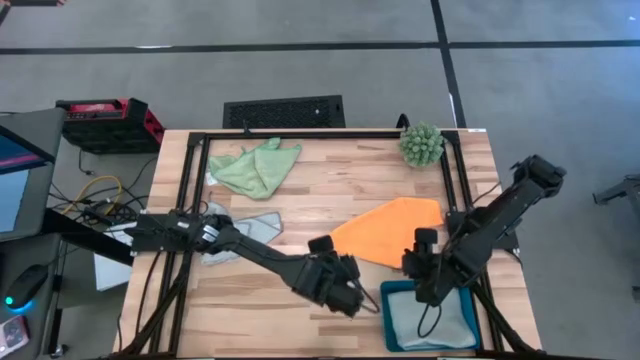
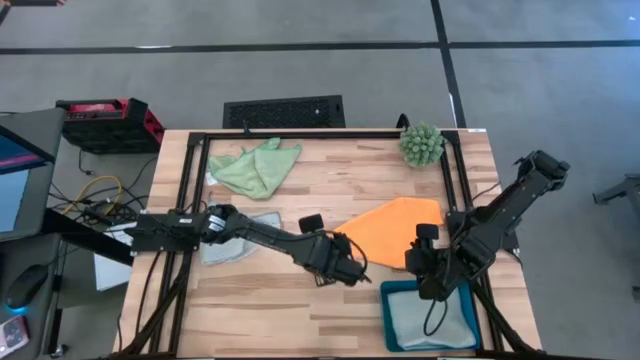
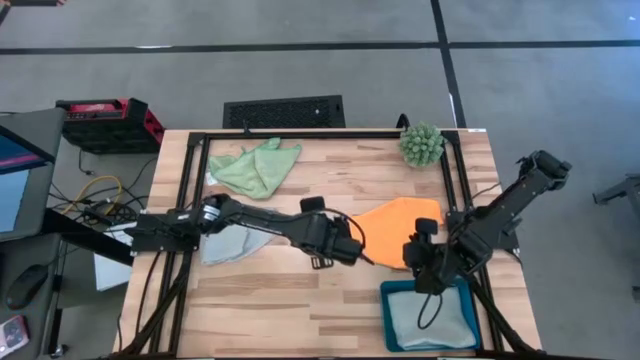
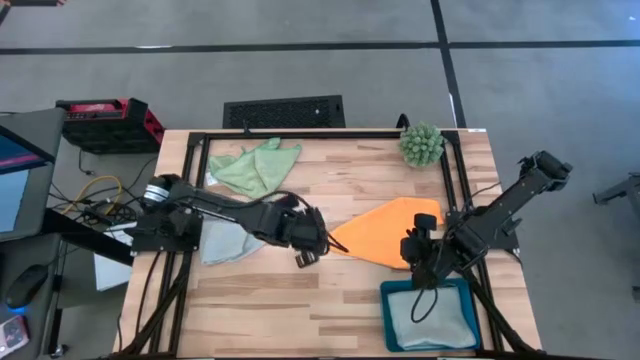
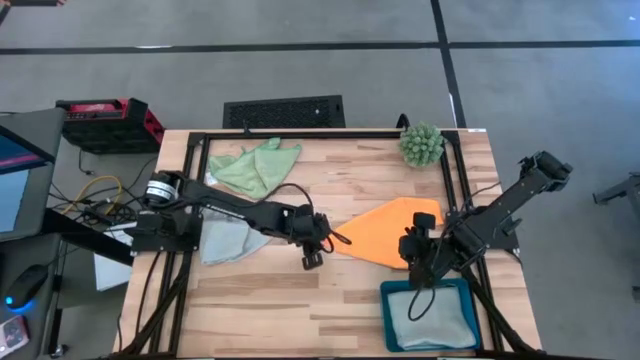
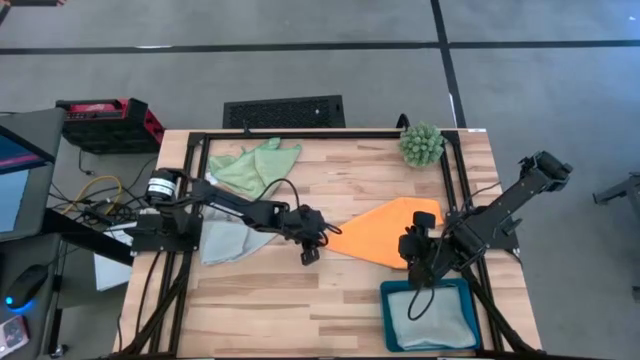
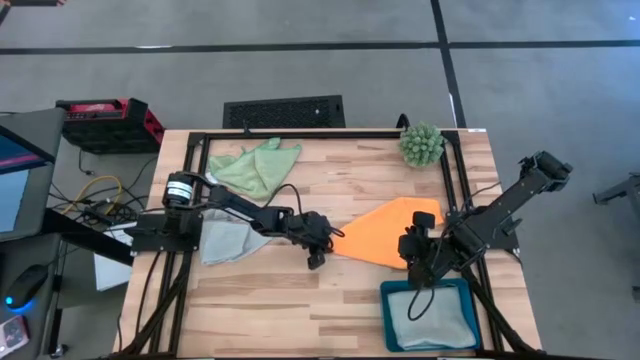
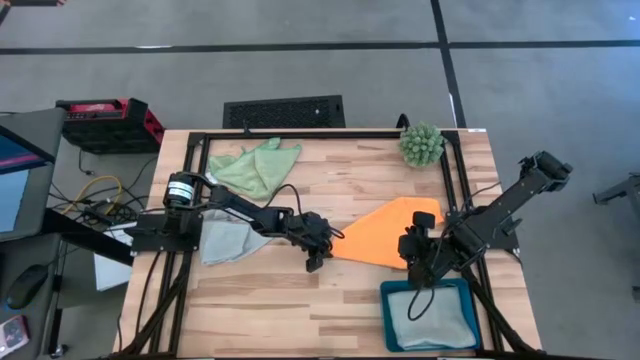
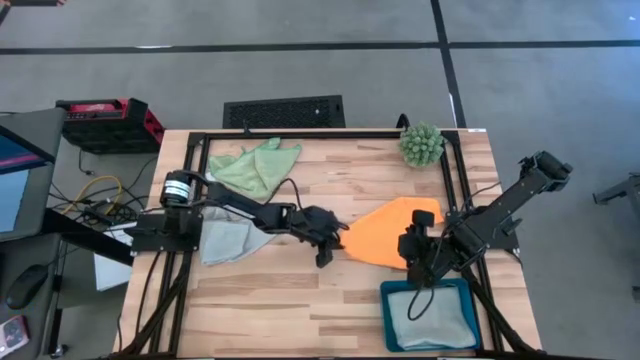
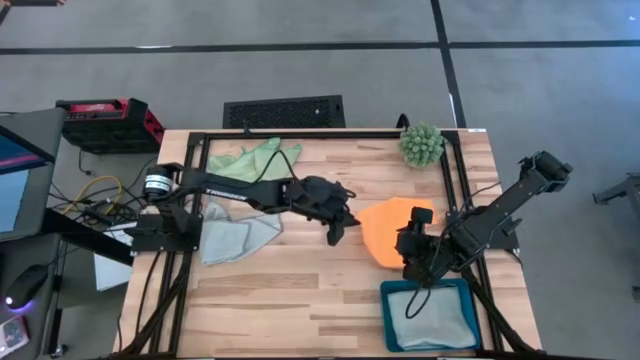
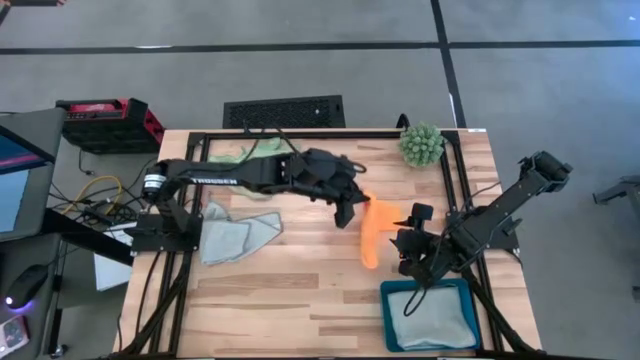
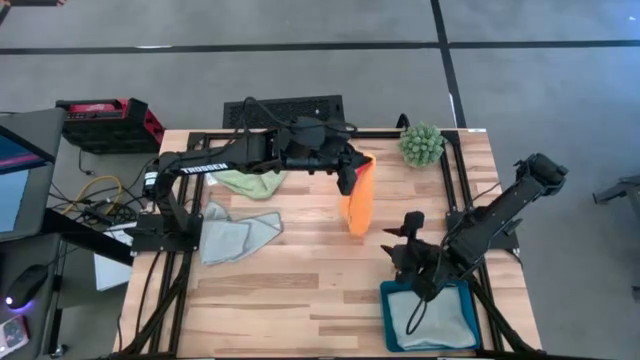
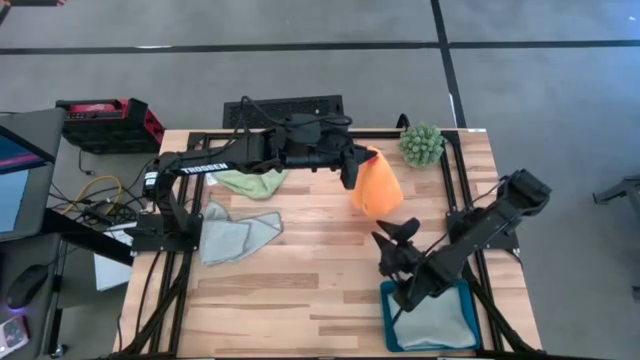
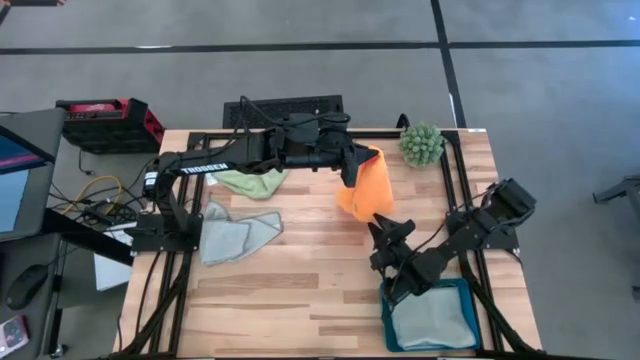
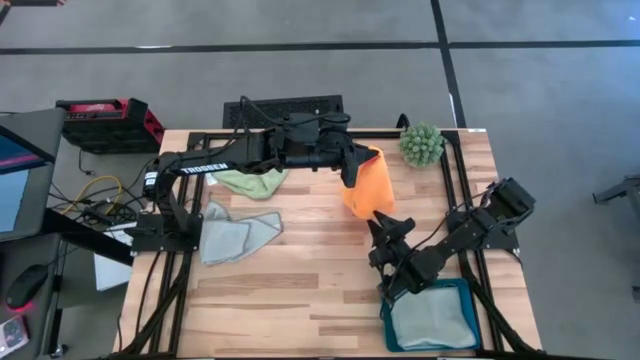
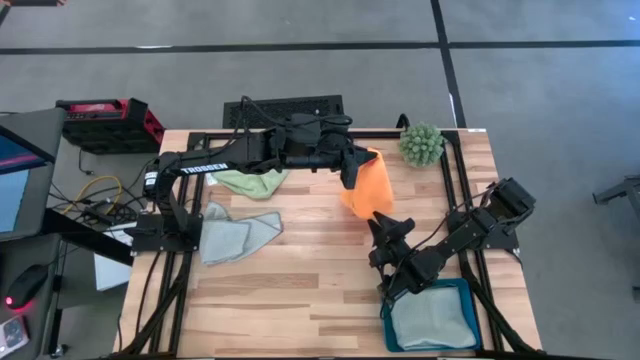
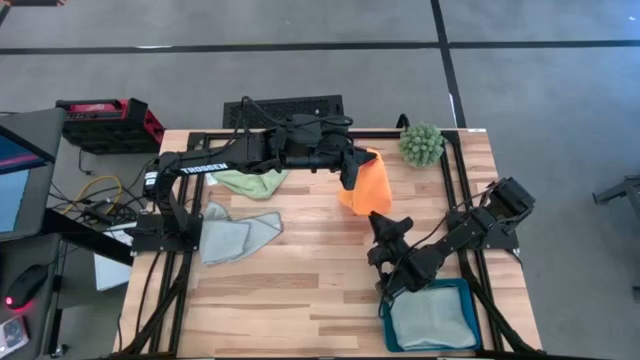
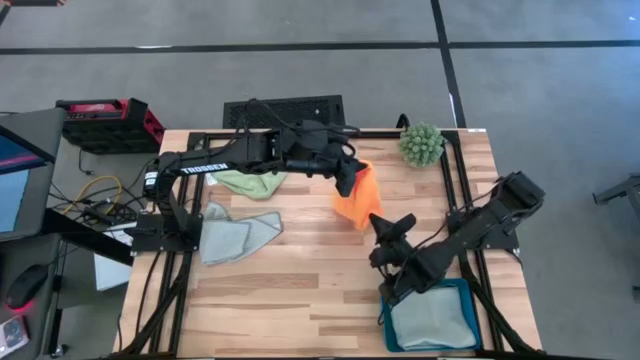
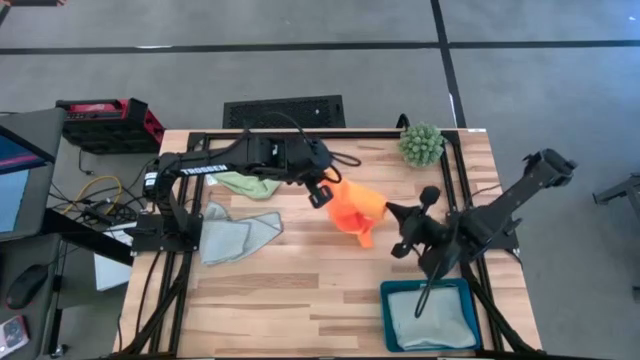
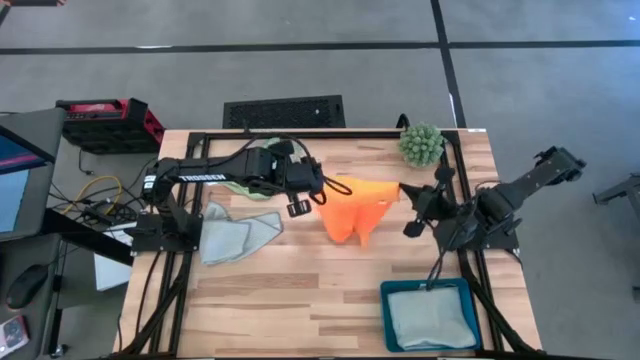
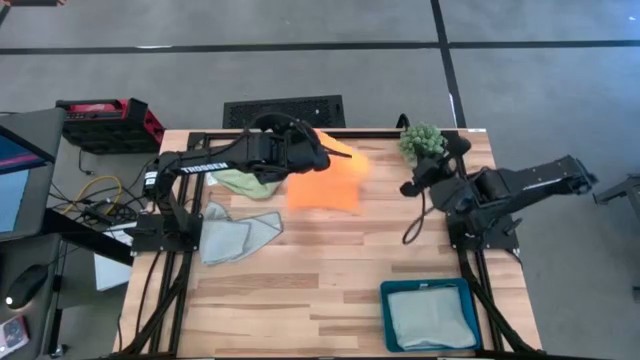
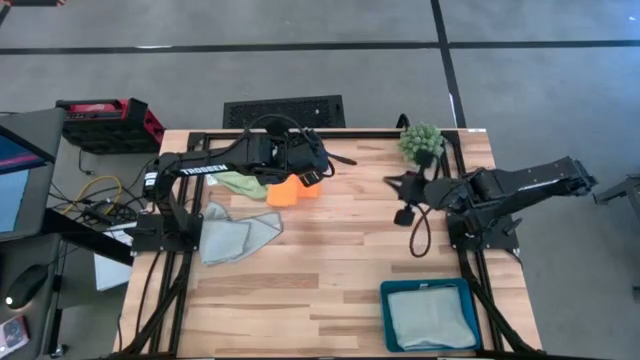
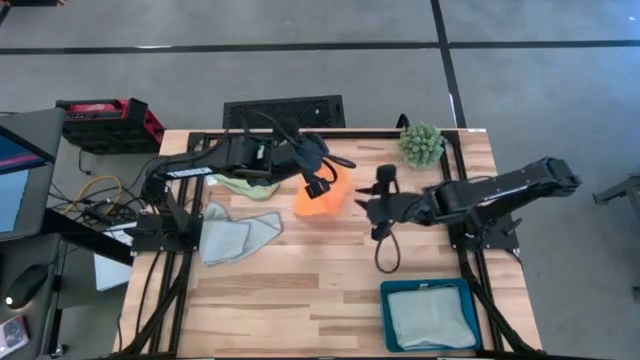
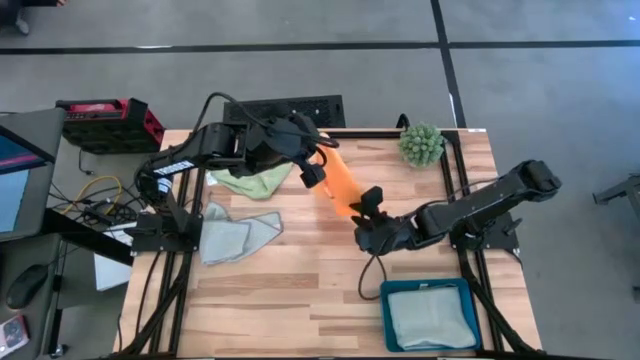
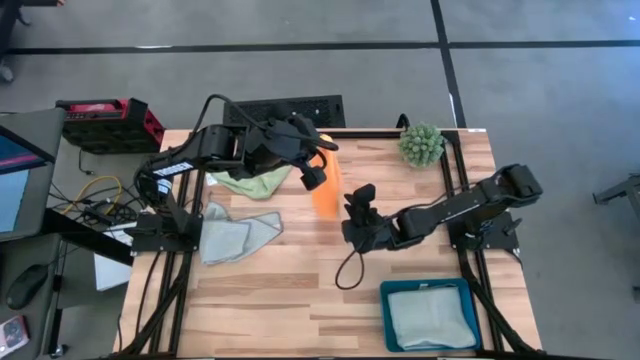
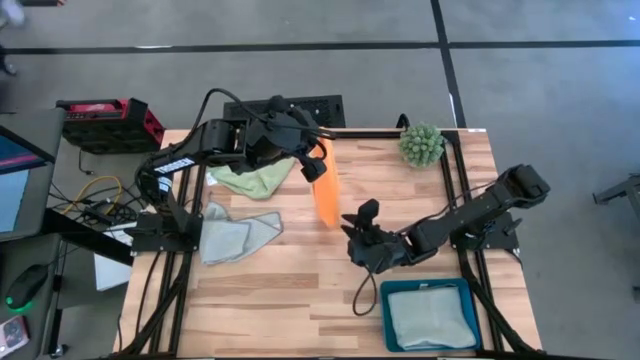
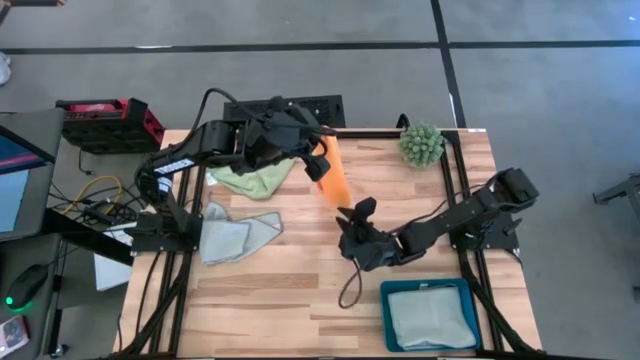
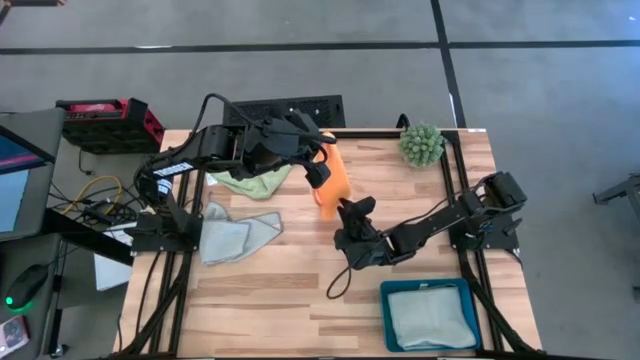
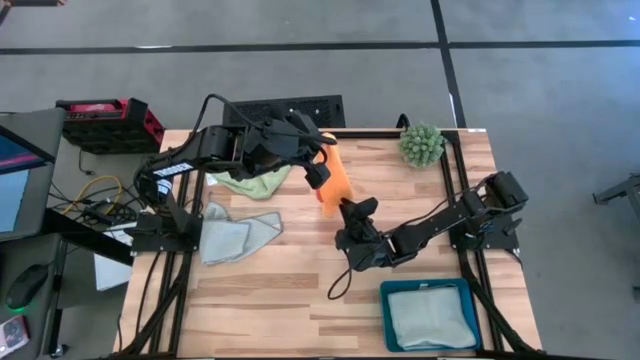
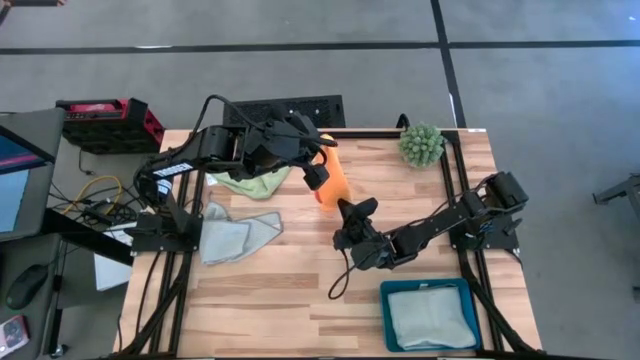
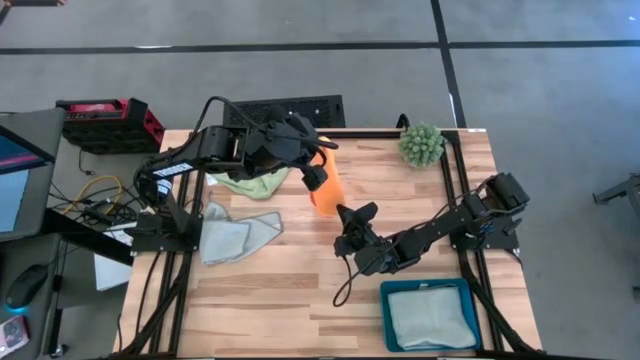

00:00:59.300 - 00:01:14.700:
Task: Fold microfiber towels
Fold the orange towel

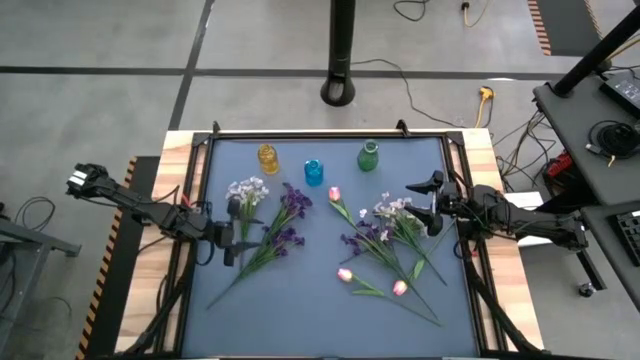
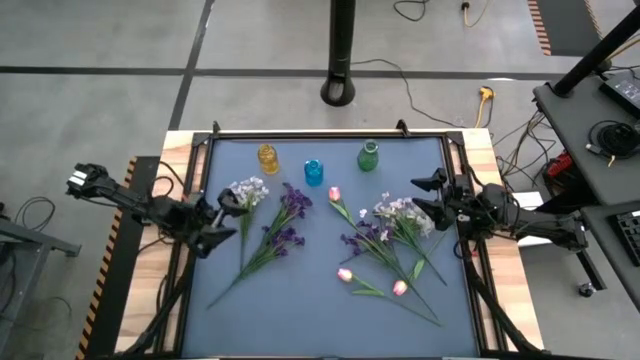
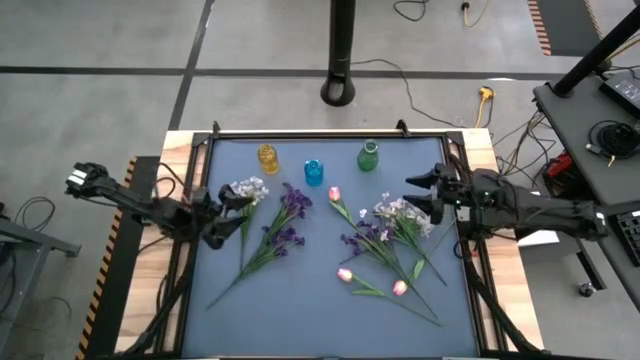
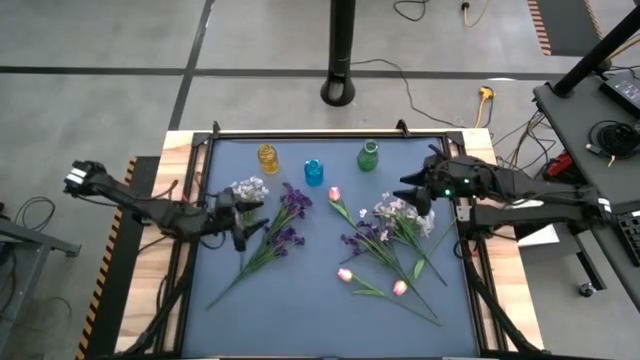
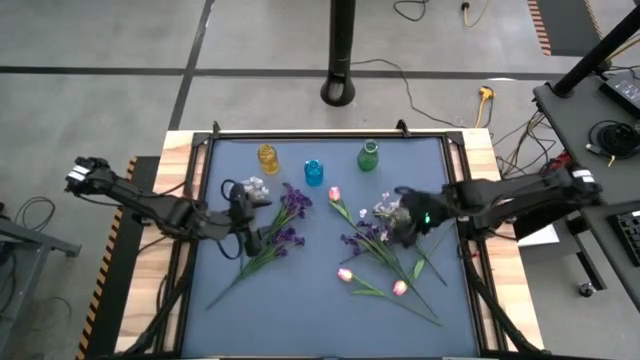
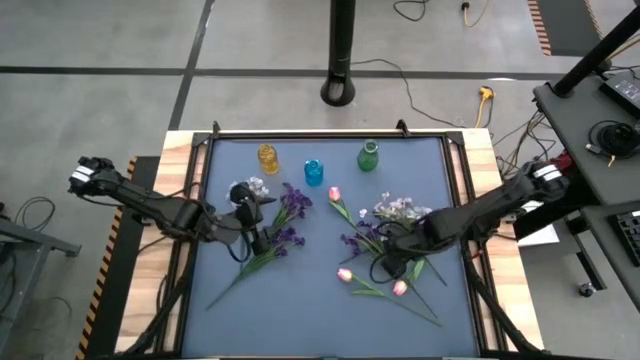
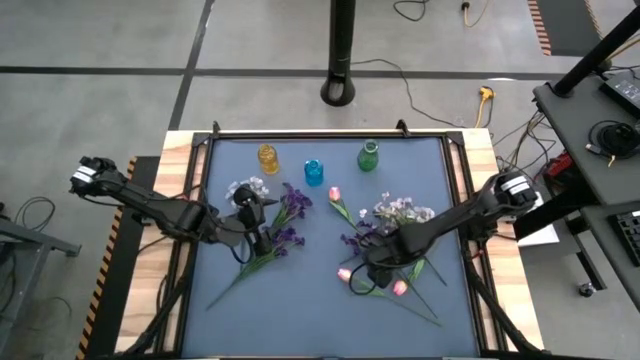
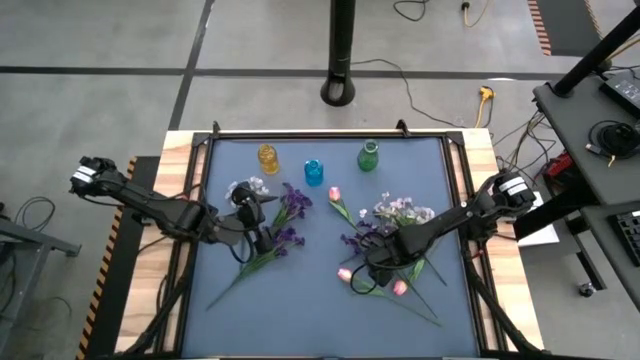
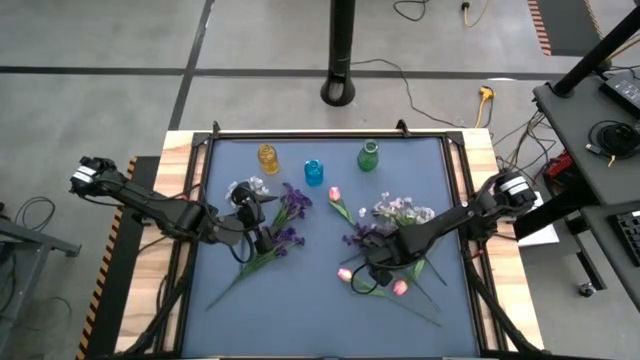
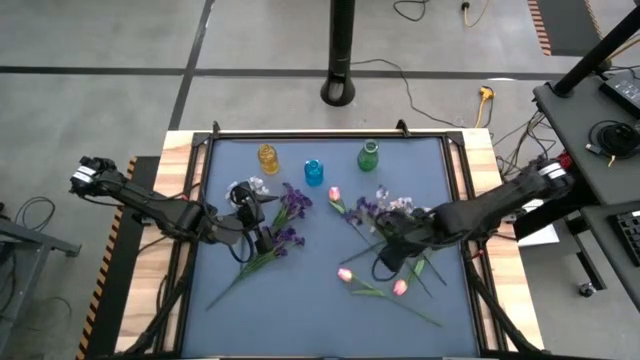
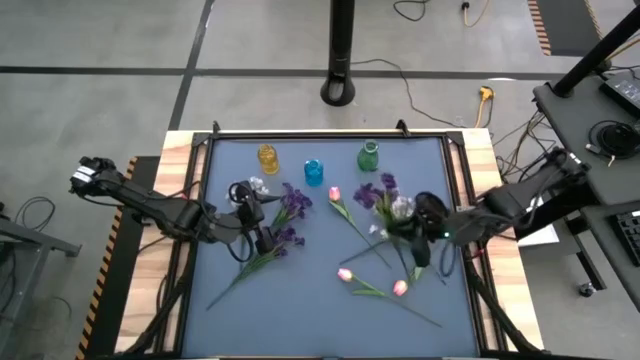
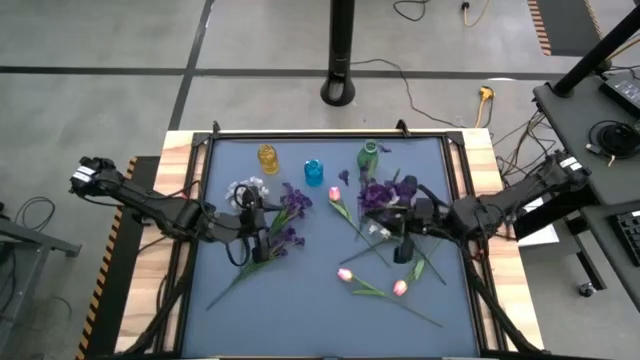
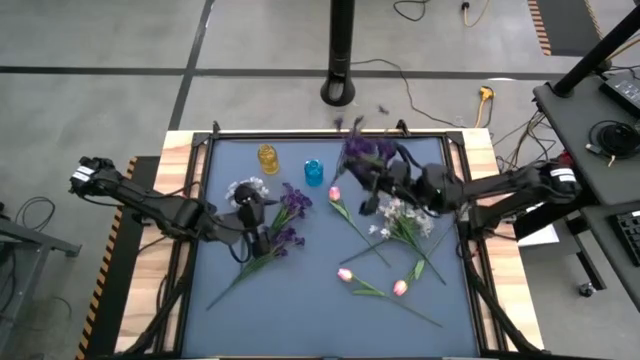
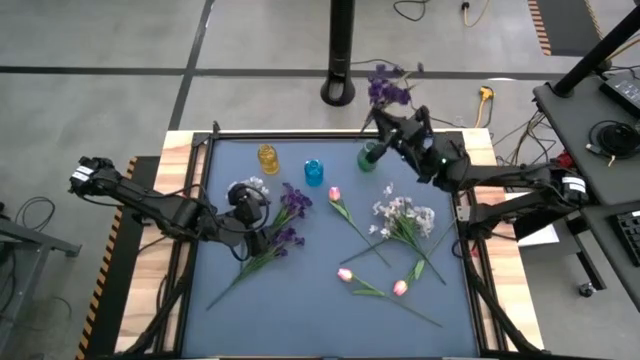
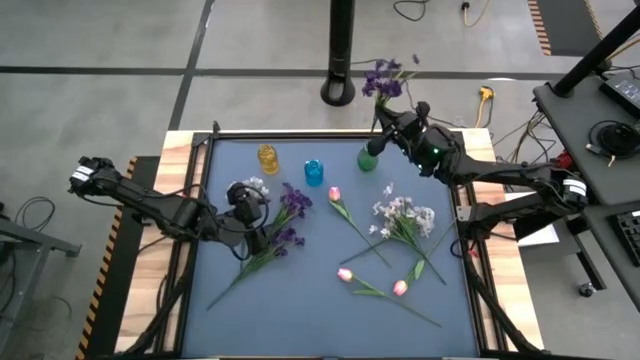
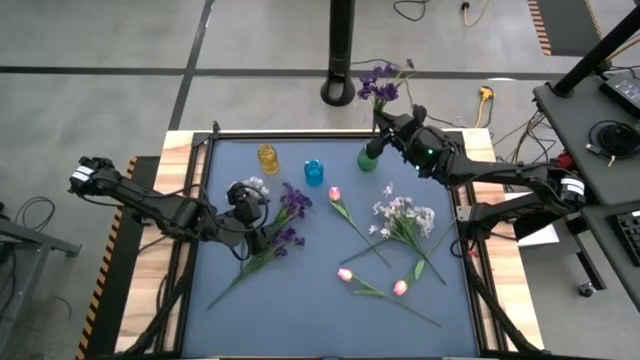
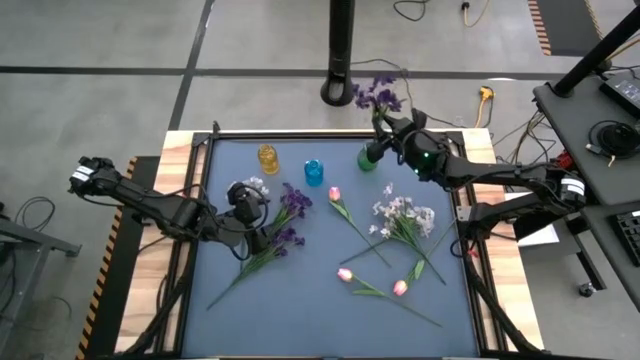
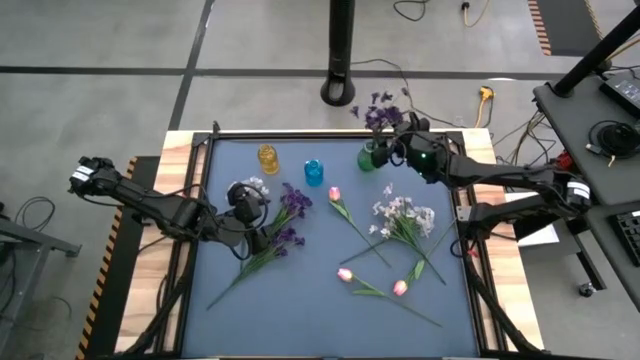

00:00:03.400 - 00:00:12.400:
Task: Sort flowers into vase by color
Put the right purple flower into the green vase
